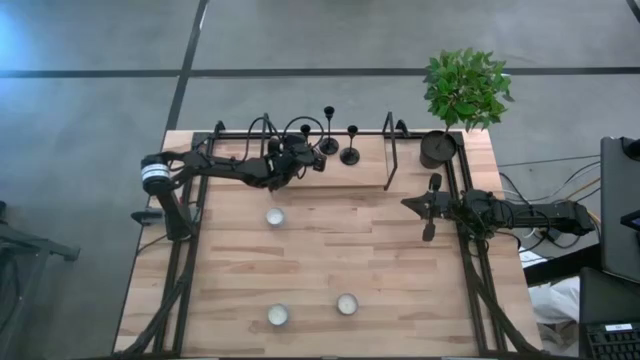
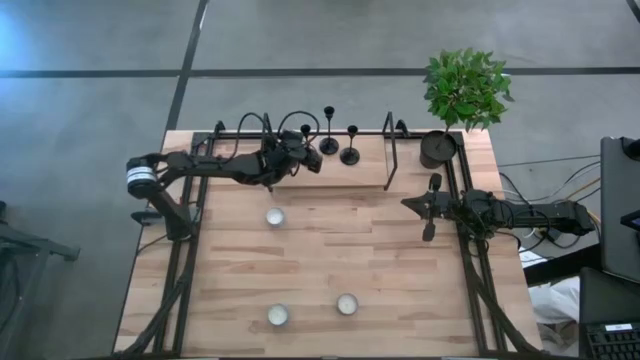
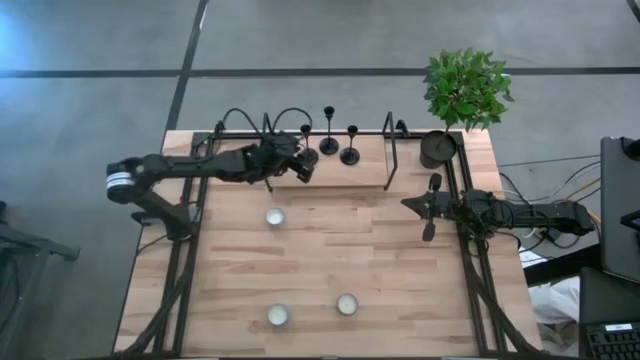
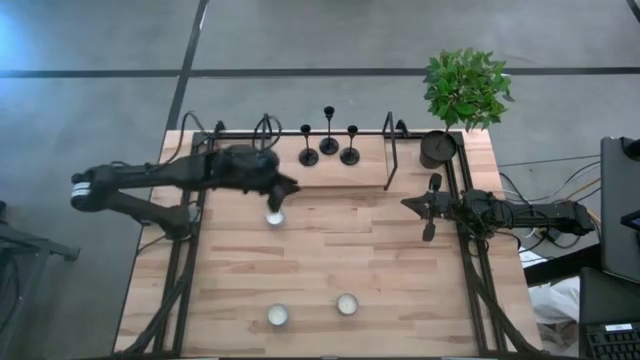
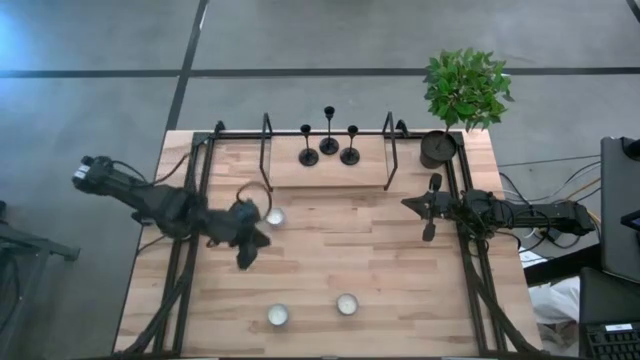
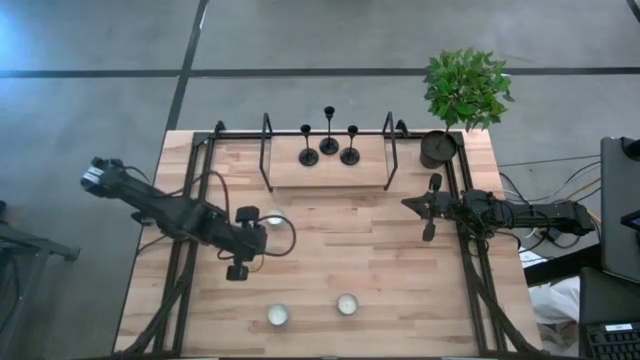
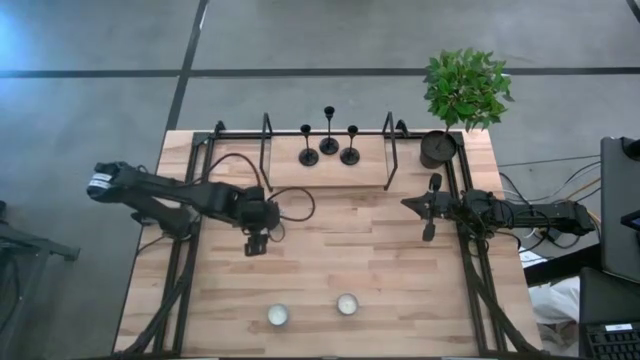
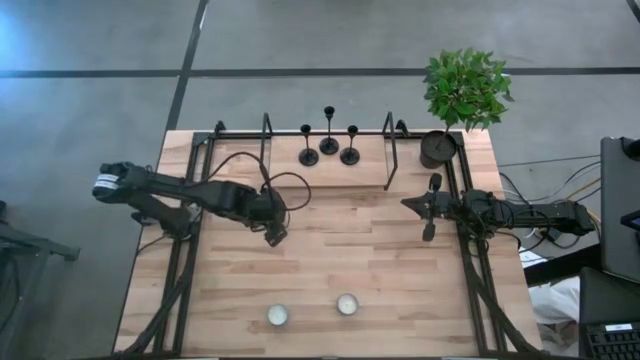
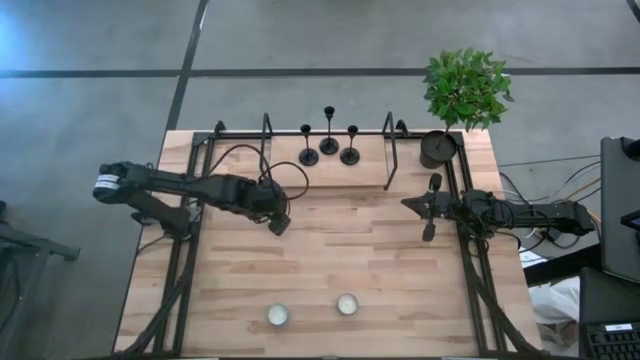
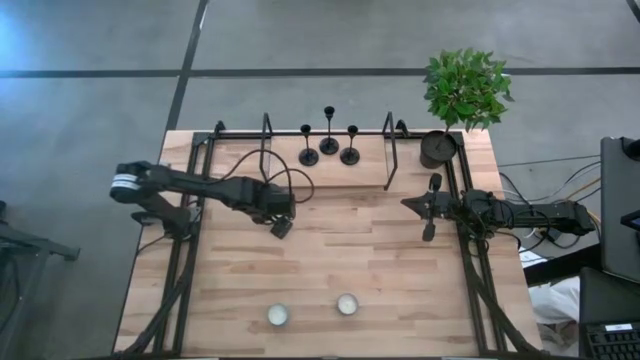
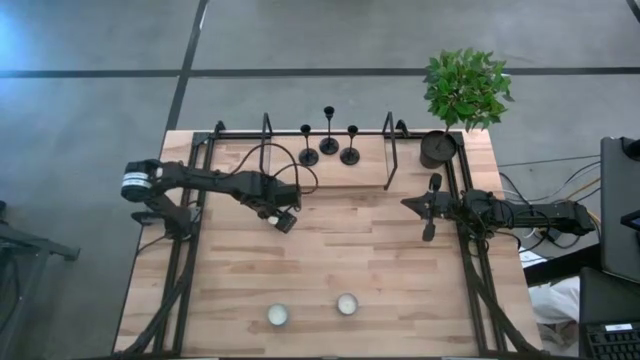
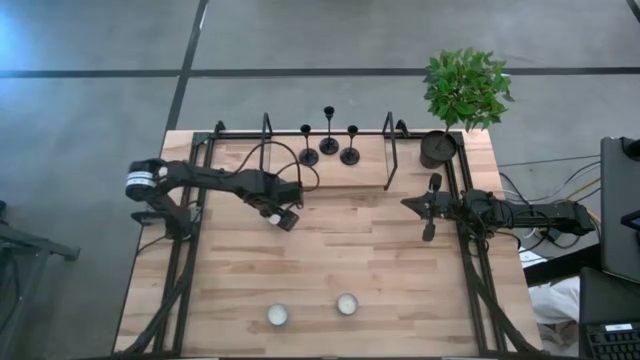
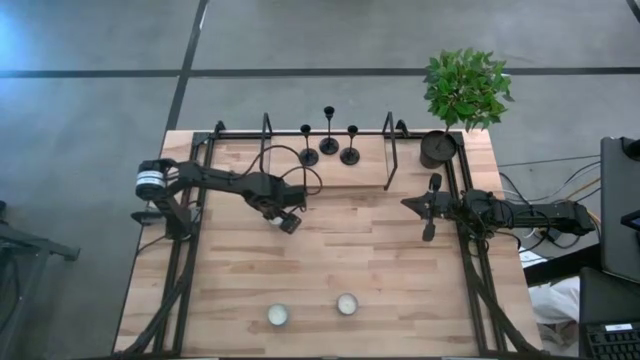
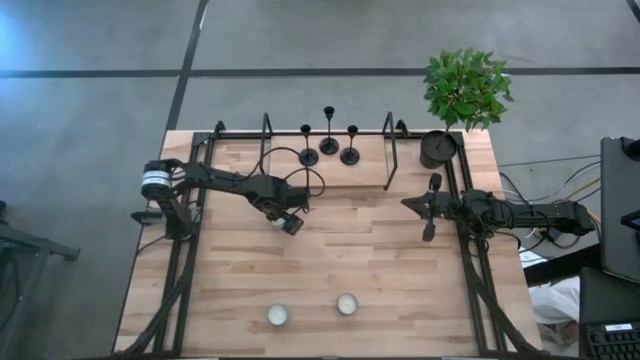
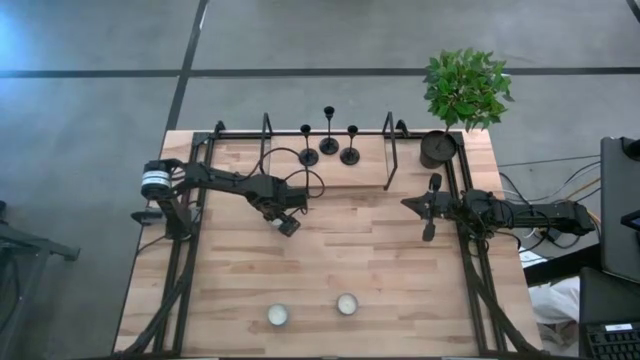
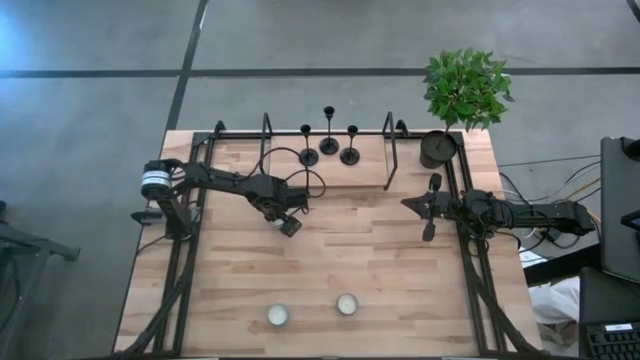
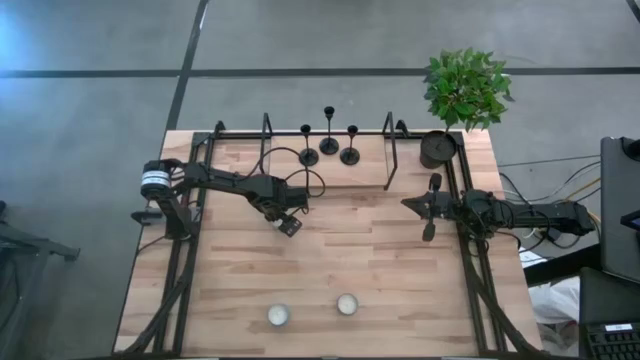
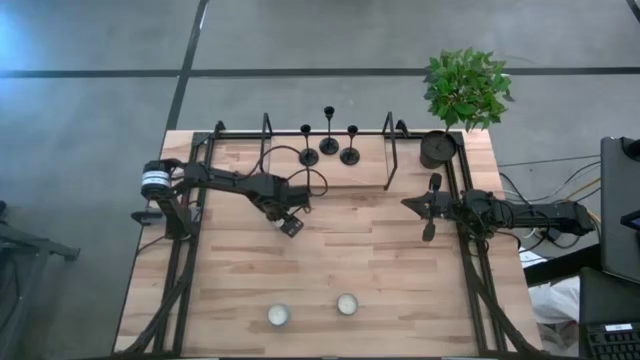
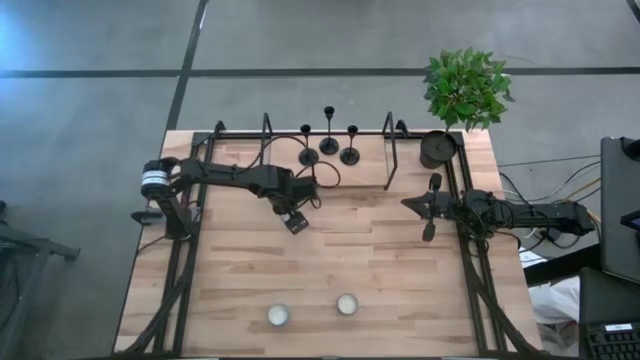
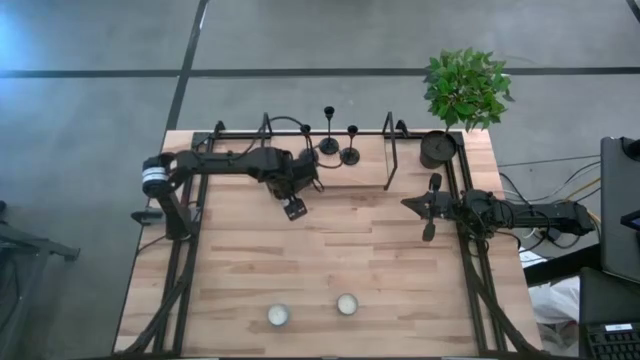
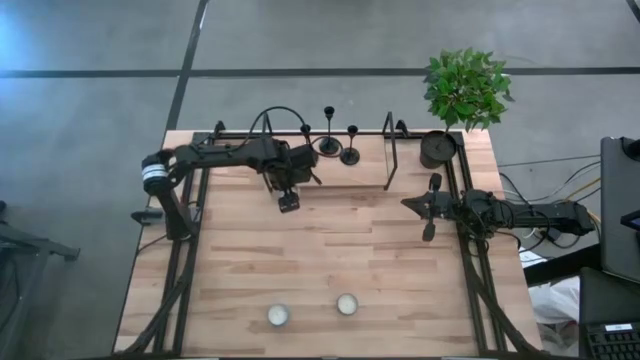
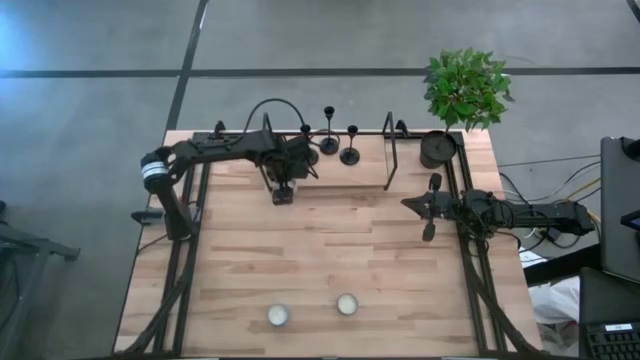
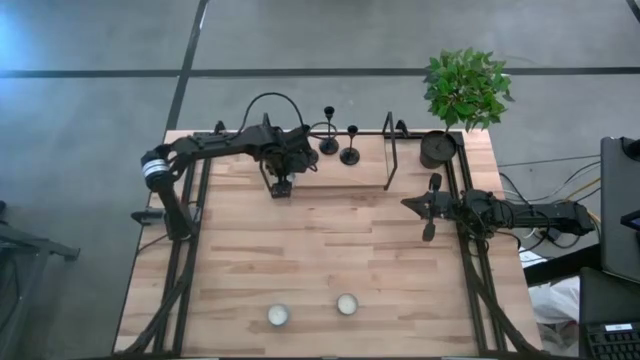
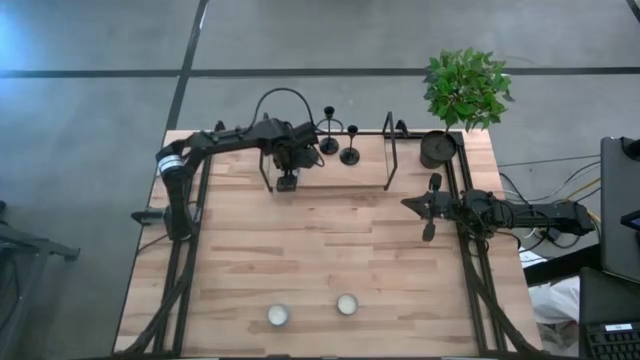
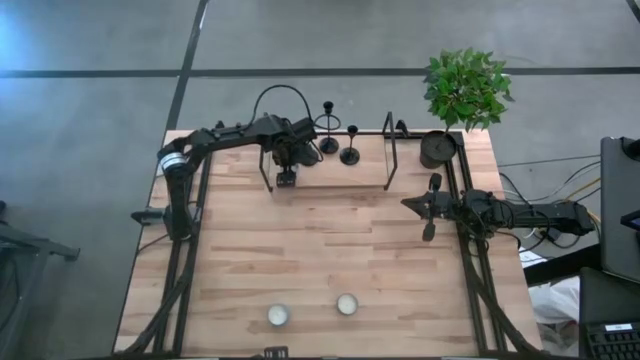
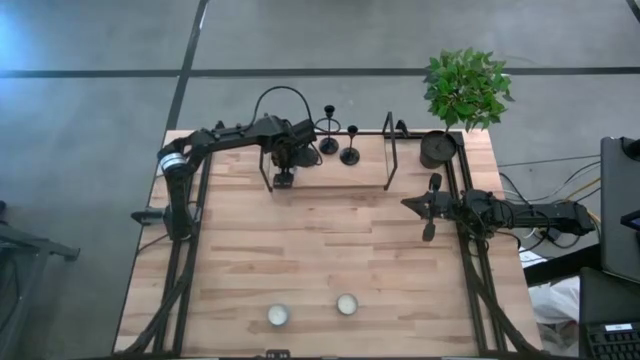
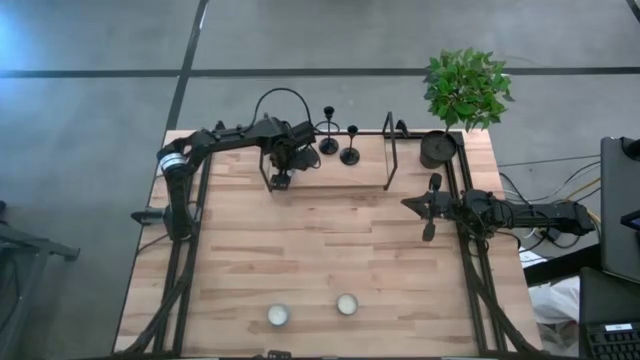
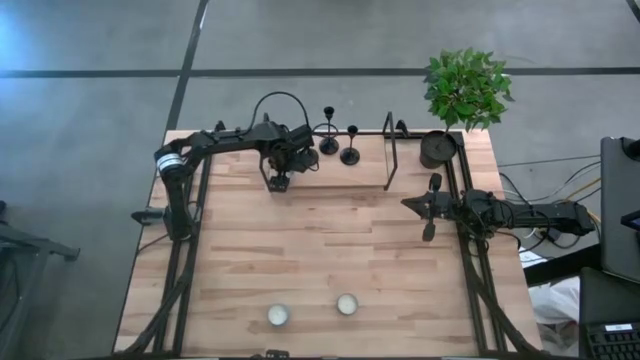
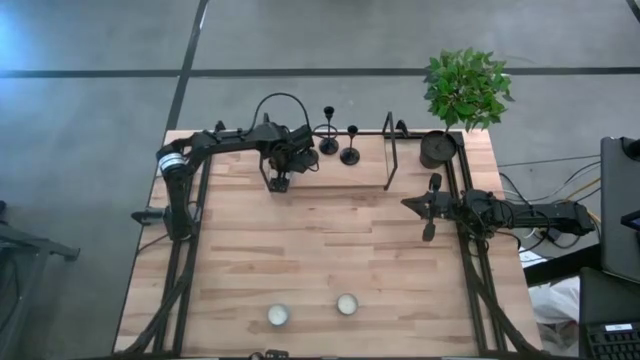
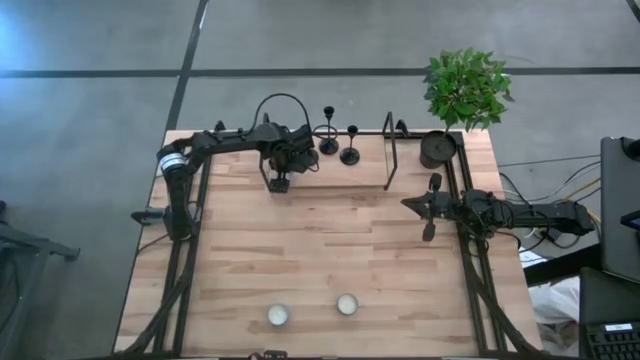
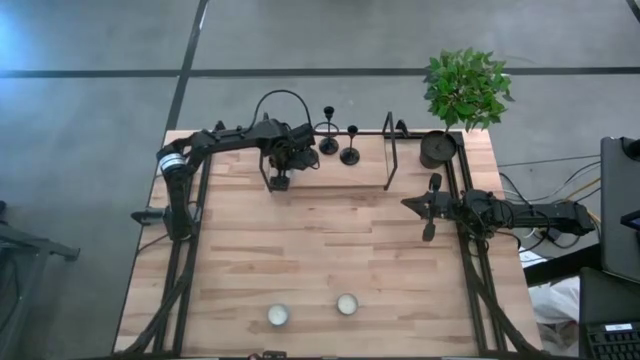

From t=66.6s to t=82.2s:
Task: Pick & Place candle stick holders
Put the white scented candle on the shelf

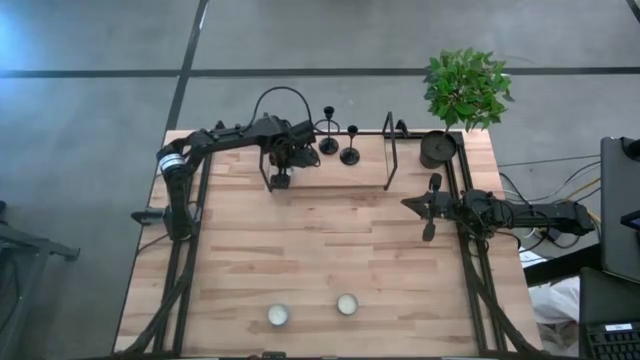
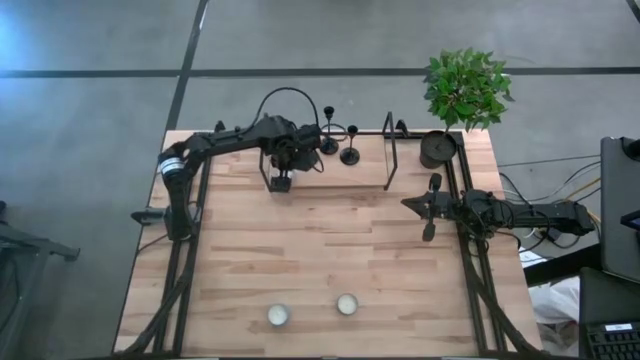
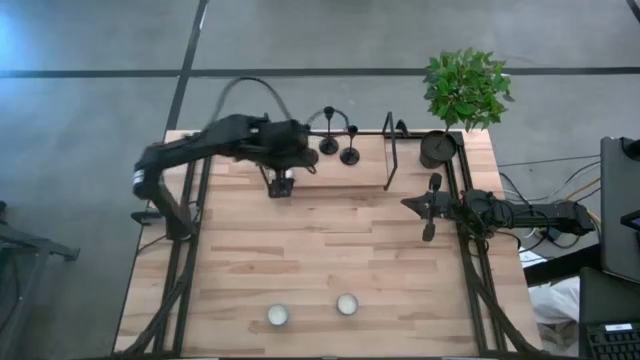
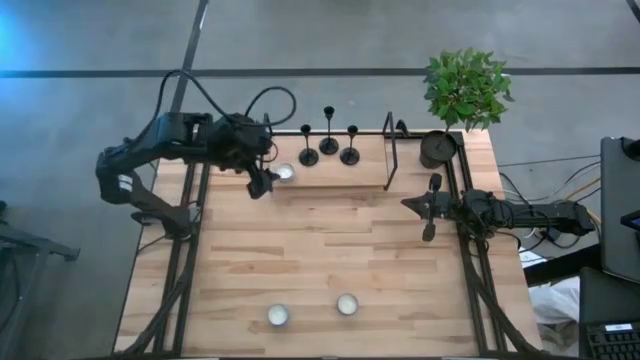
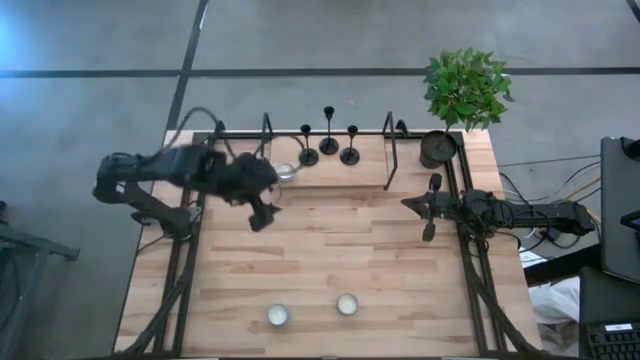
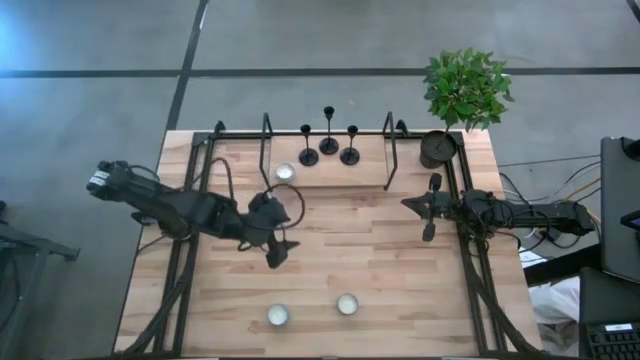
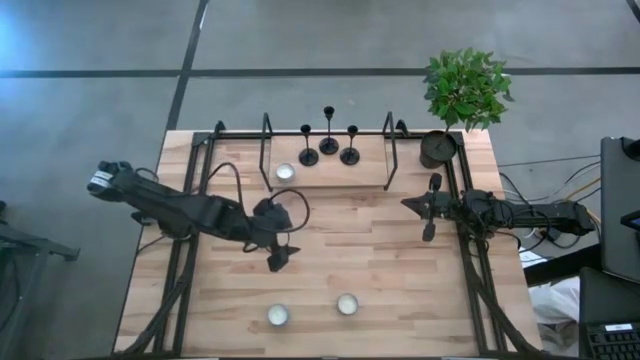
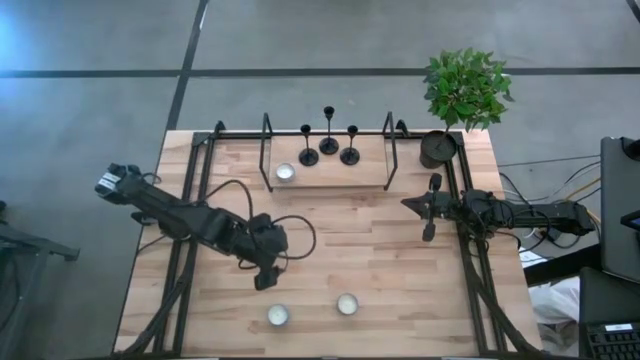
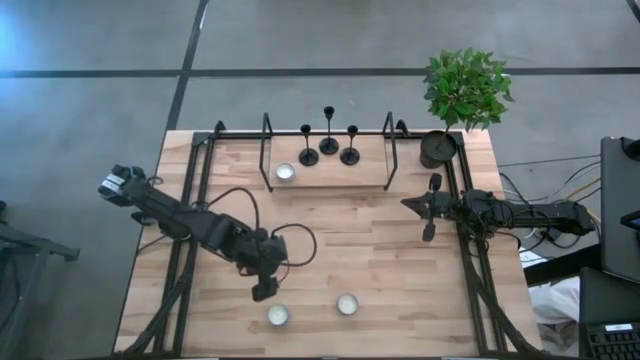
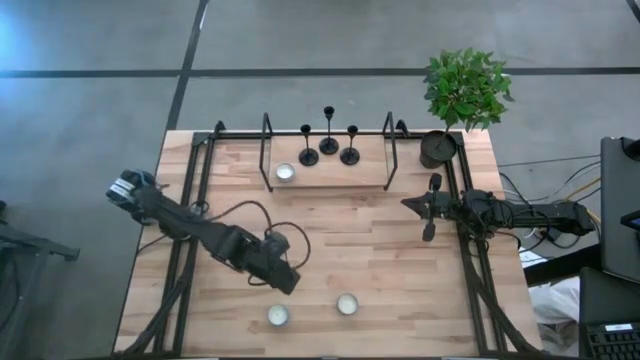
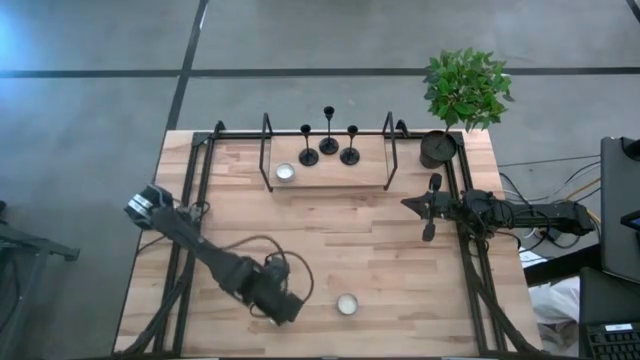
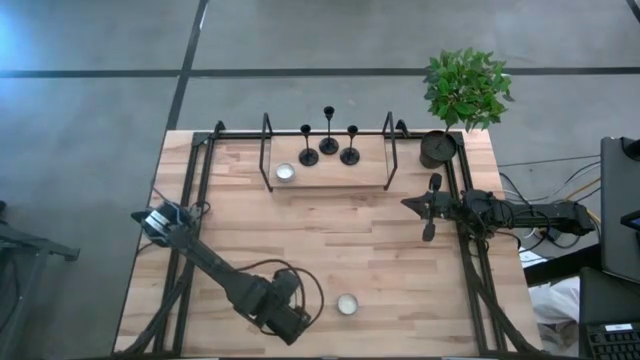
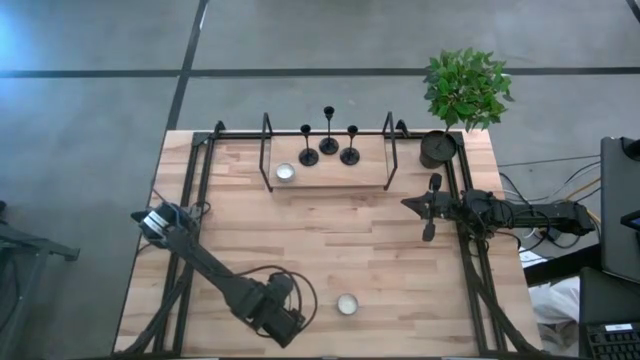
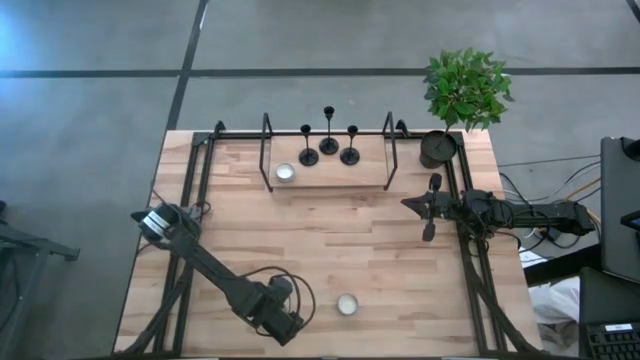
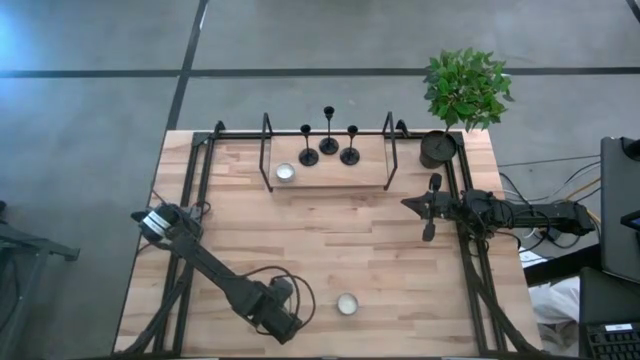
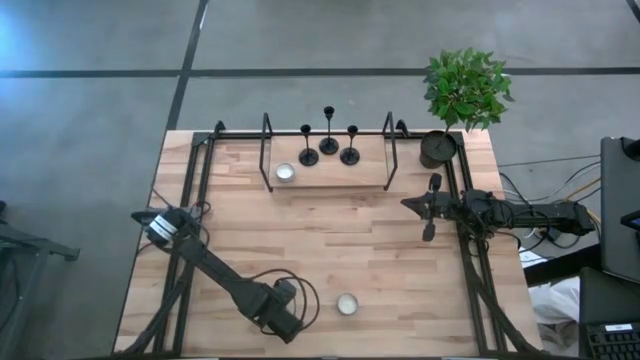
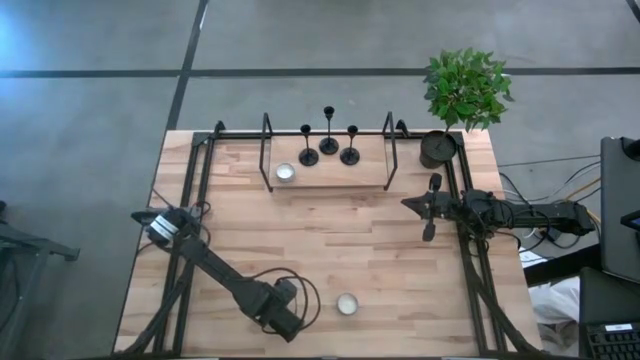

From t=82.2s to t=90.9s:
Put the blue scented candle on the shelf
